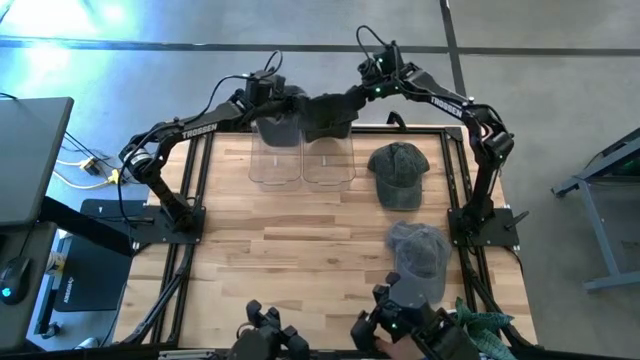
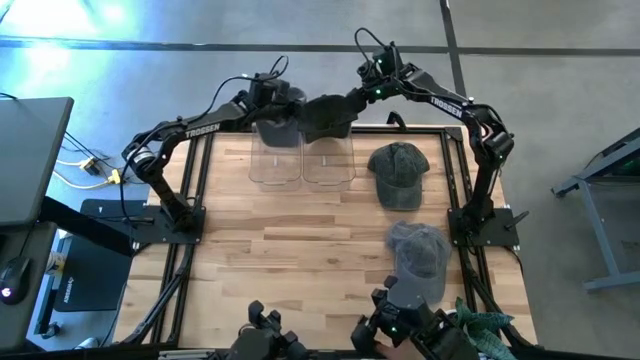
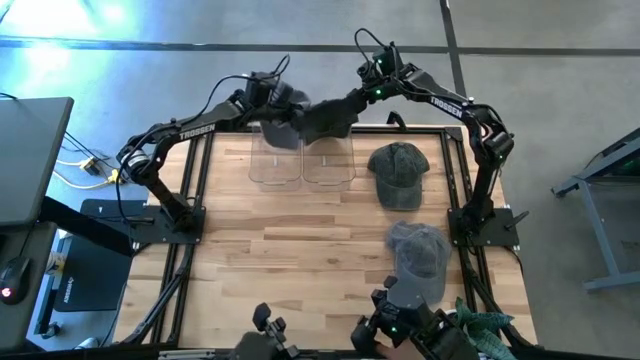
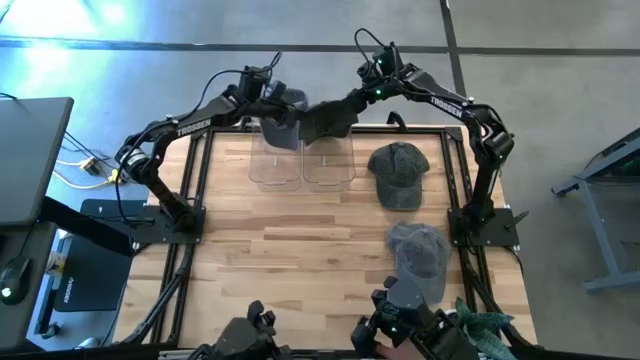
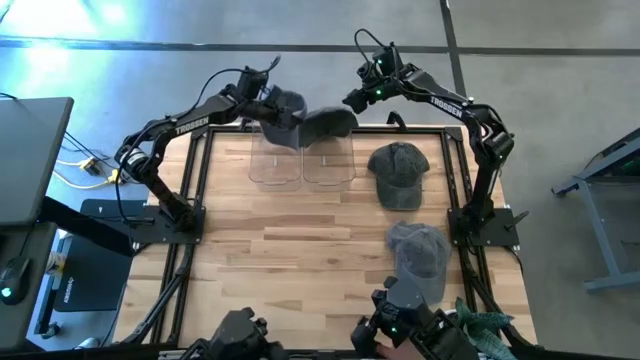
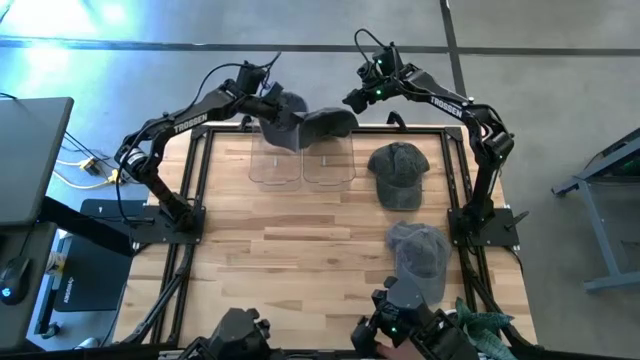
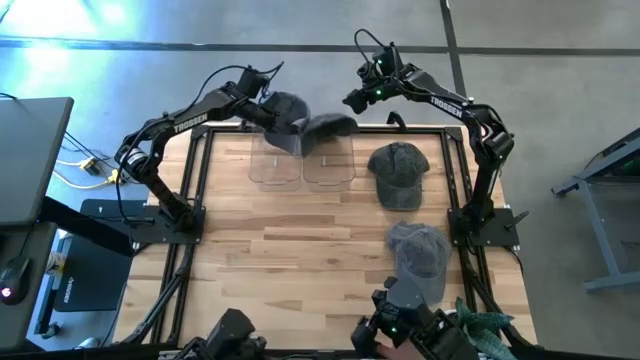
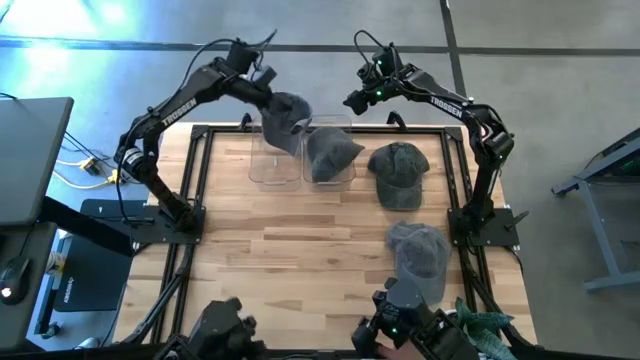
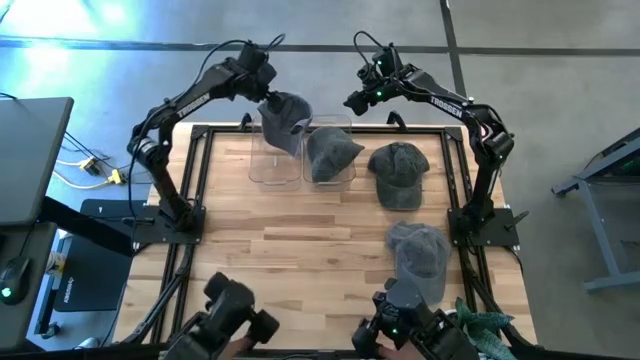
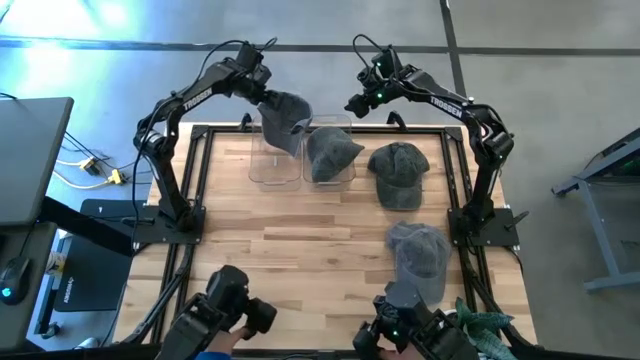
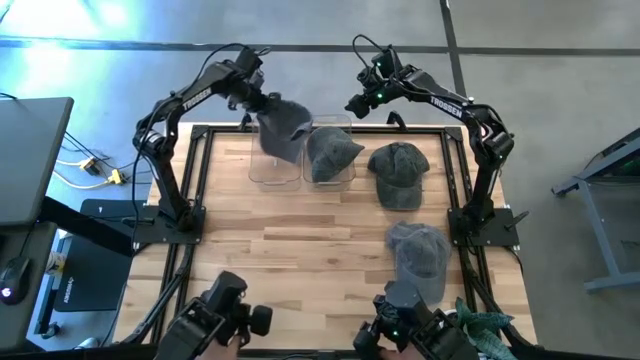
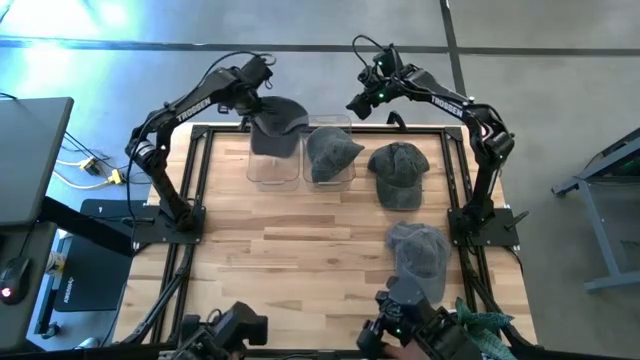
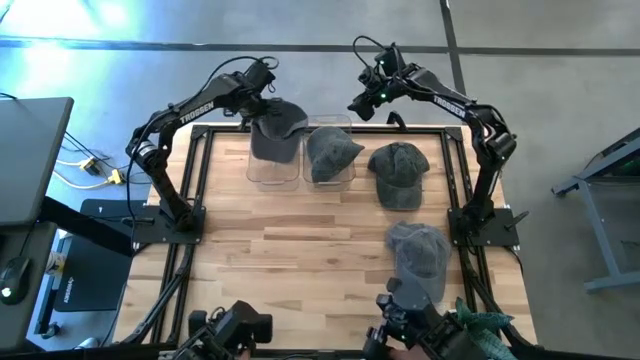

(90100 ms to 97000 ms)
Task: Pick & Place hat
Adjust the gray cap

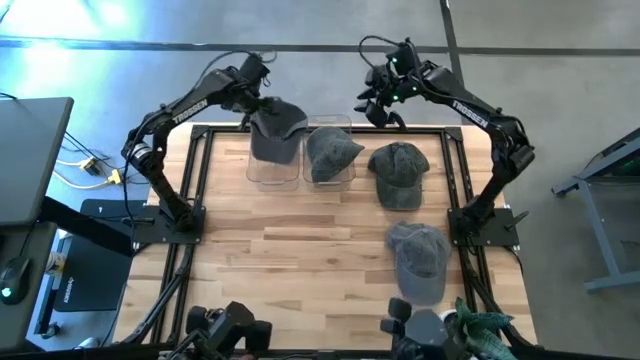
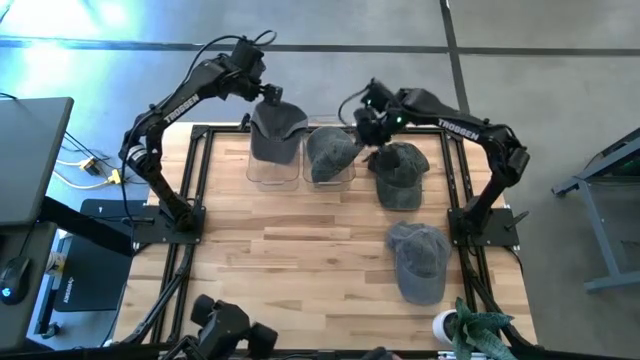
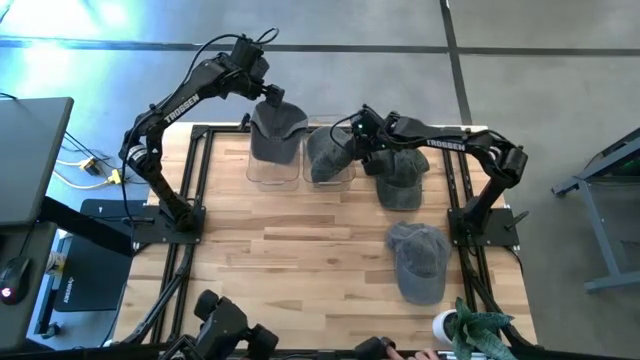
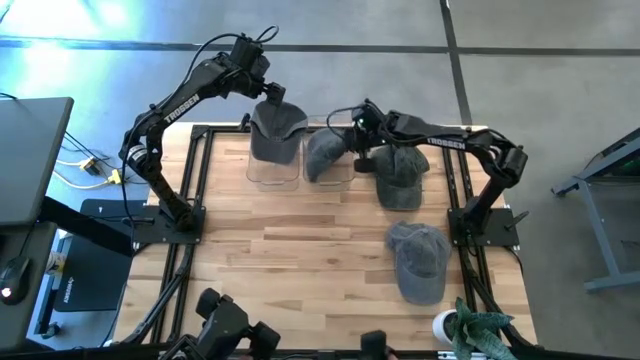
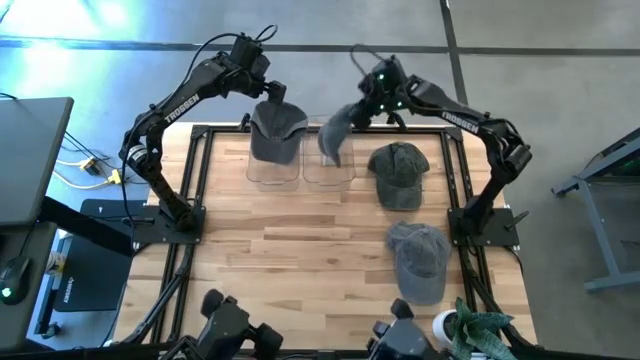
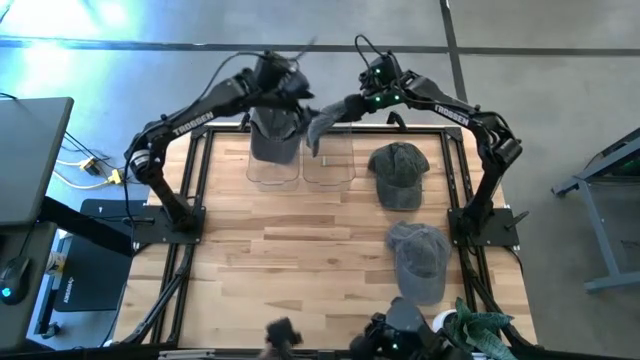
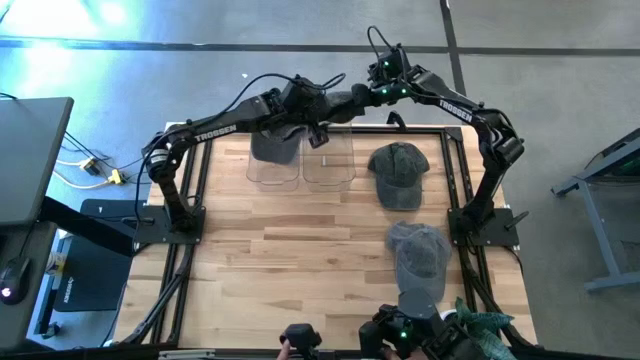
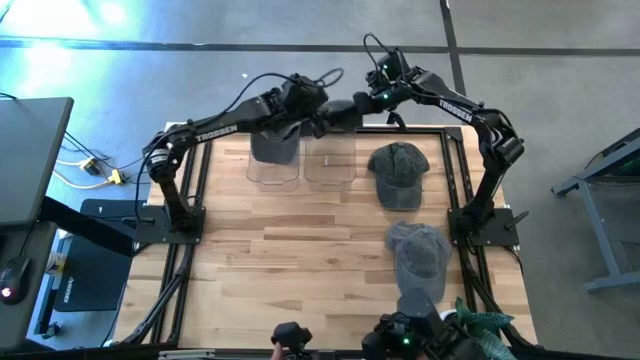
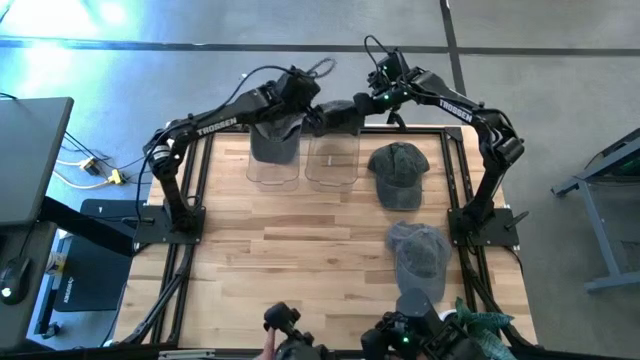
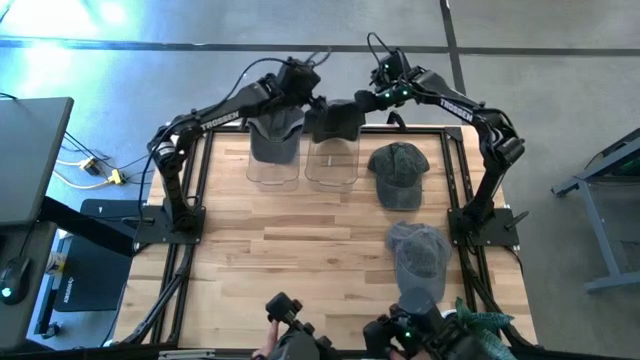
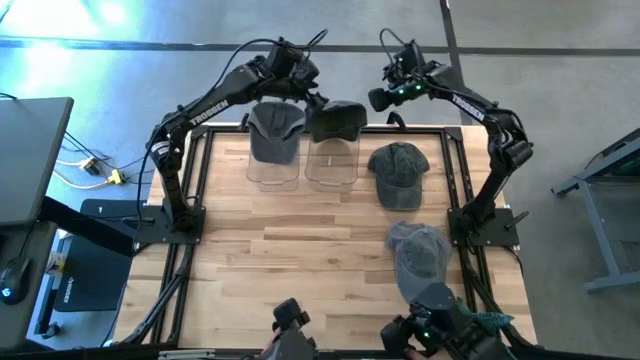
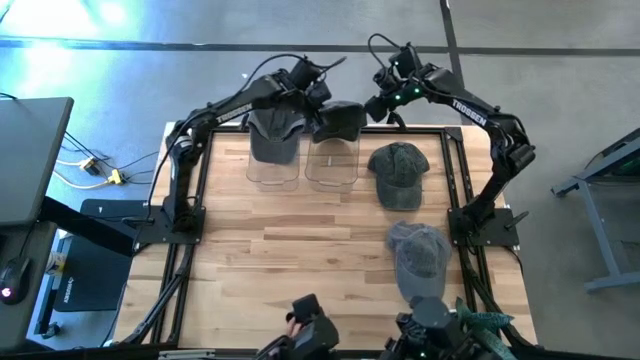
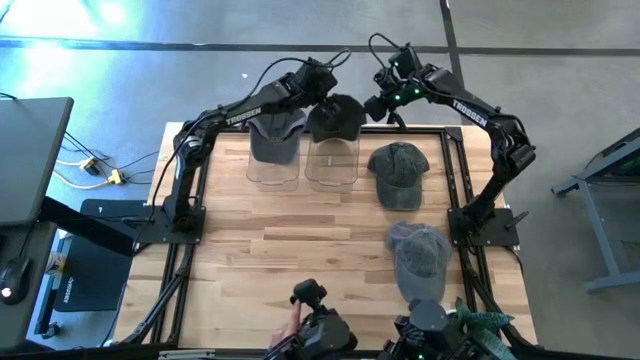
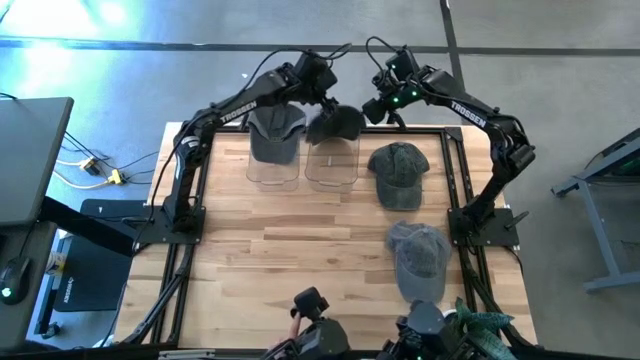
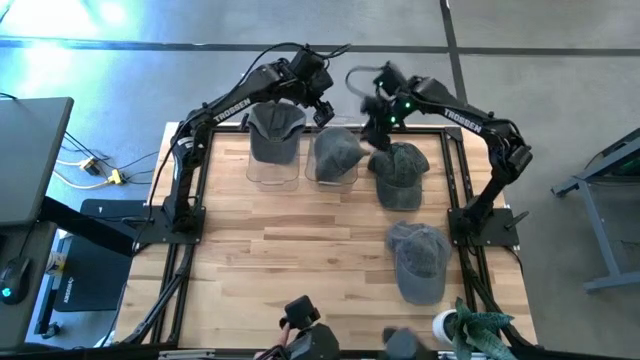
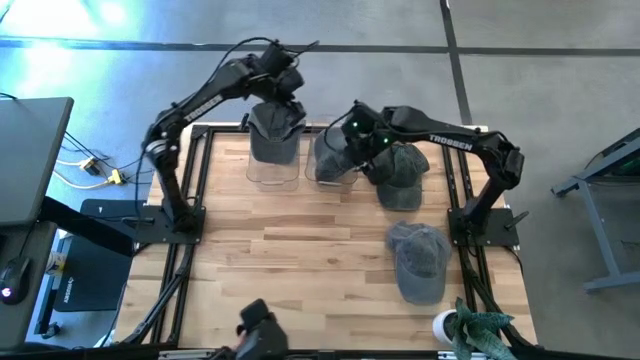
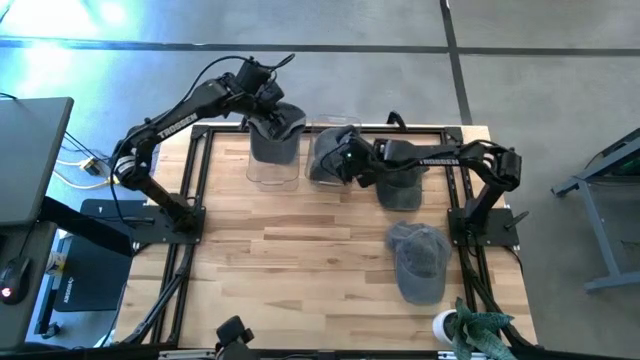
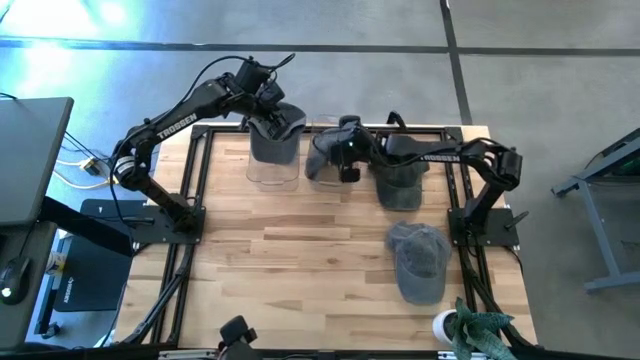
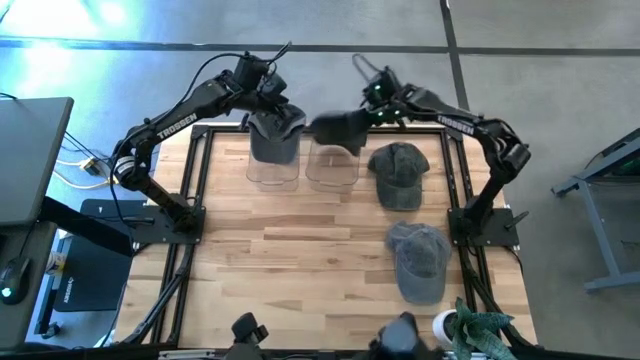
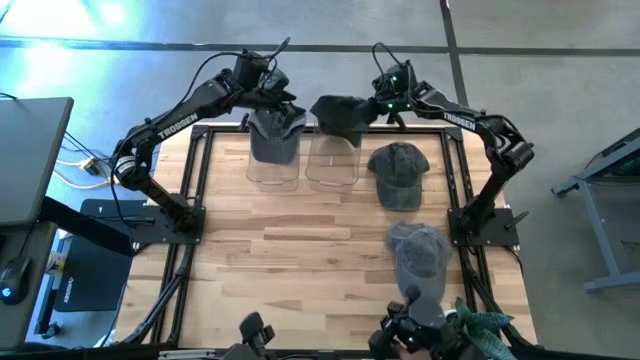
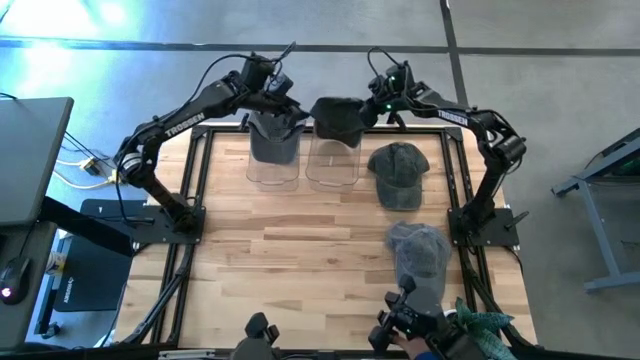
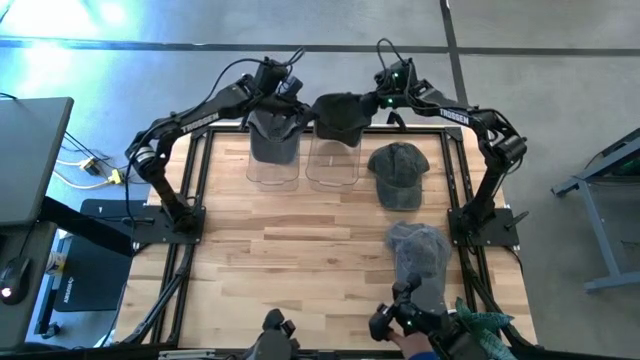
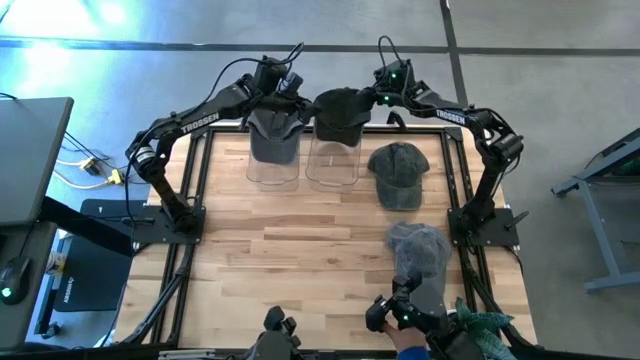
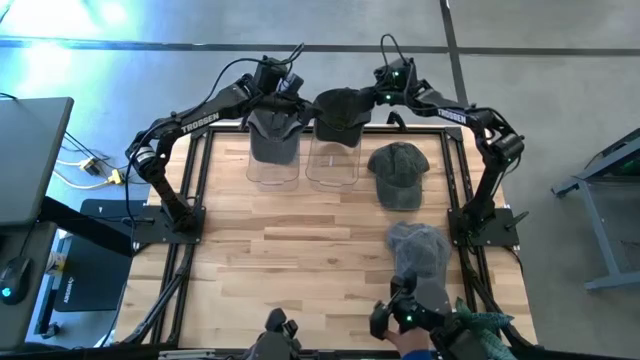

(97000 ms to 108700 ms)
Adjust the black cap
